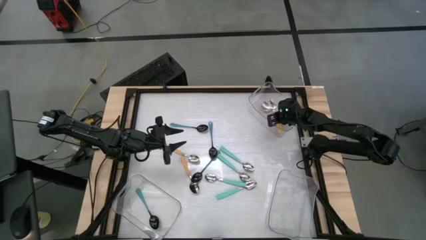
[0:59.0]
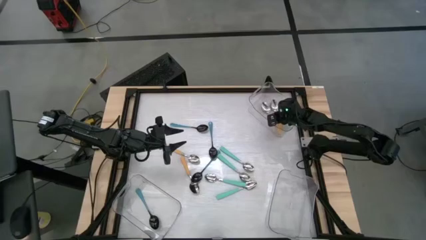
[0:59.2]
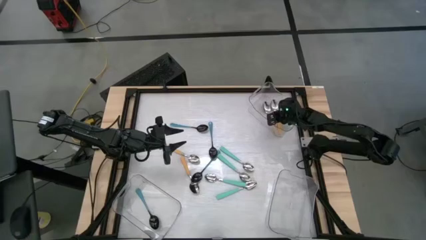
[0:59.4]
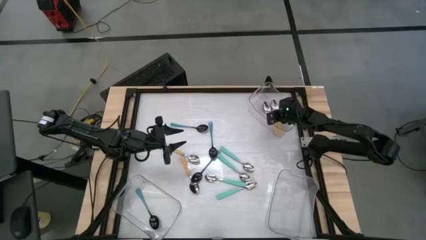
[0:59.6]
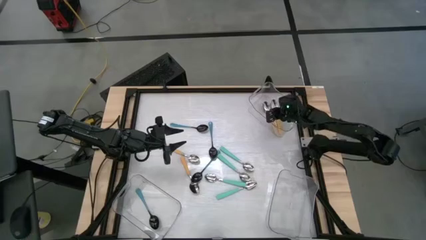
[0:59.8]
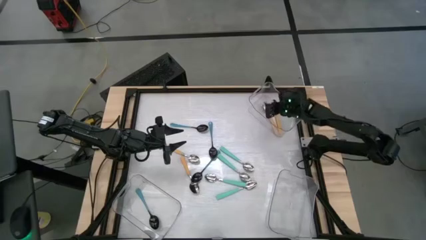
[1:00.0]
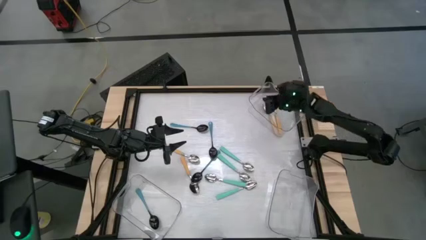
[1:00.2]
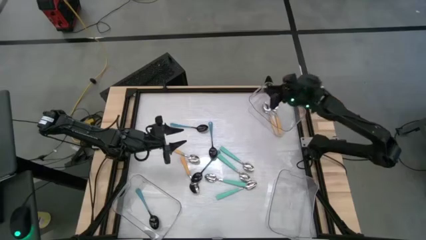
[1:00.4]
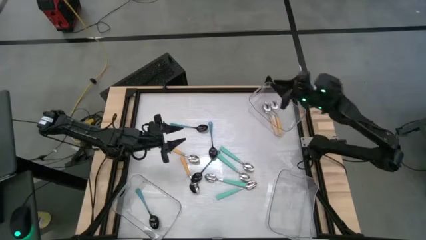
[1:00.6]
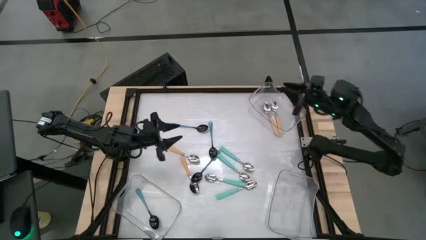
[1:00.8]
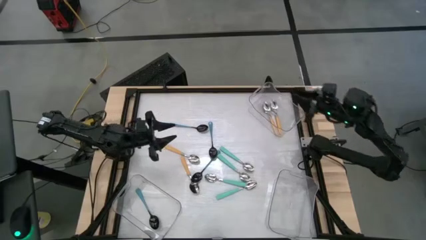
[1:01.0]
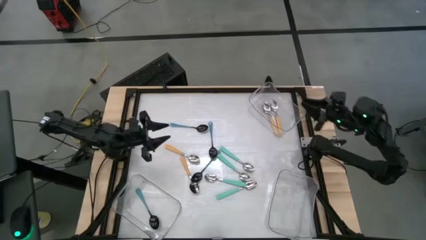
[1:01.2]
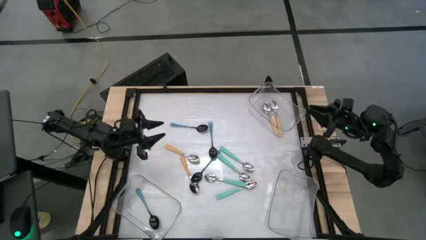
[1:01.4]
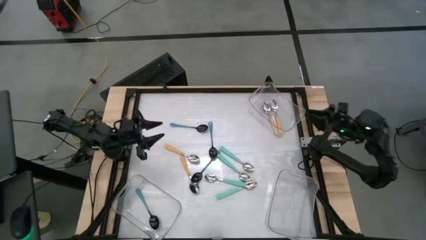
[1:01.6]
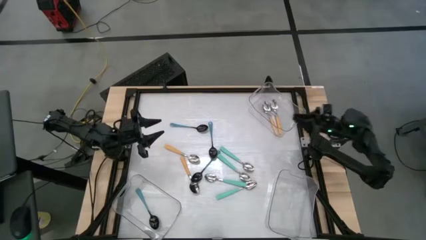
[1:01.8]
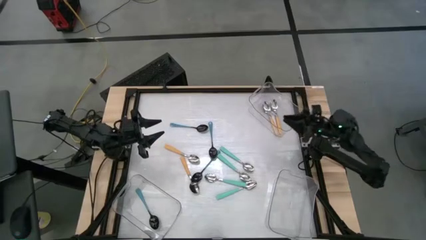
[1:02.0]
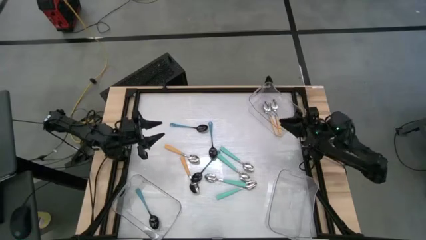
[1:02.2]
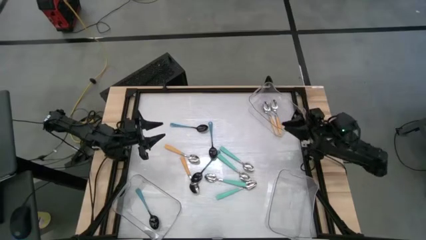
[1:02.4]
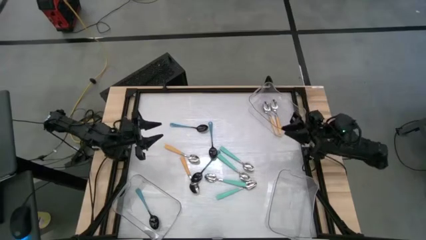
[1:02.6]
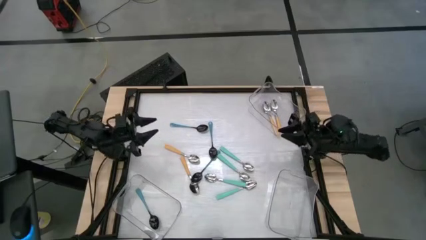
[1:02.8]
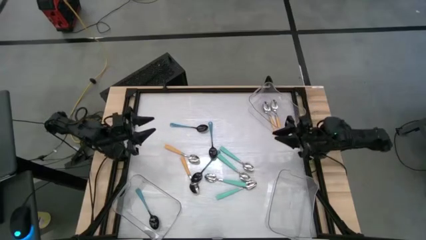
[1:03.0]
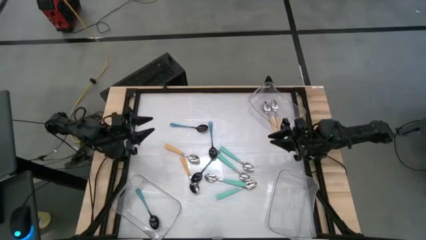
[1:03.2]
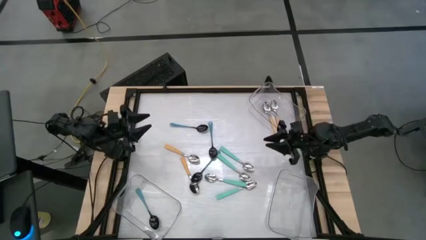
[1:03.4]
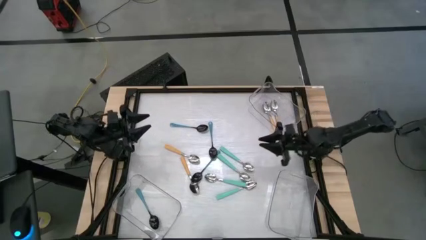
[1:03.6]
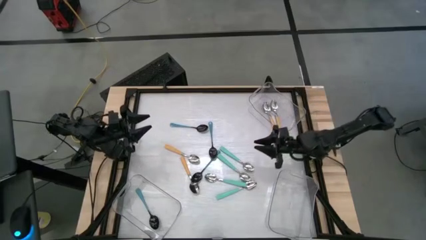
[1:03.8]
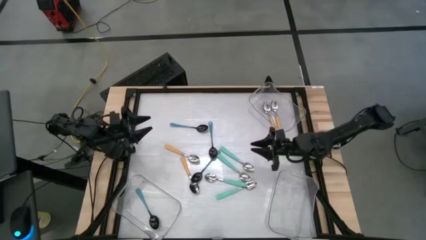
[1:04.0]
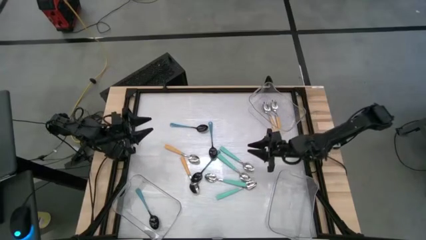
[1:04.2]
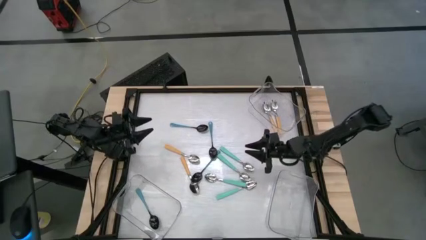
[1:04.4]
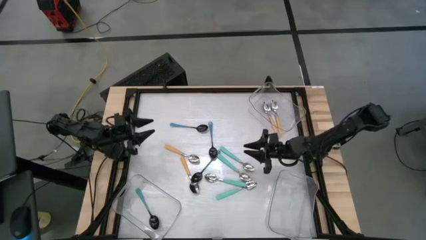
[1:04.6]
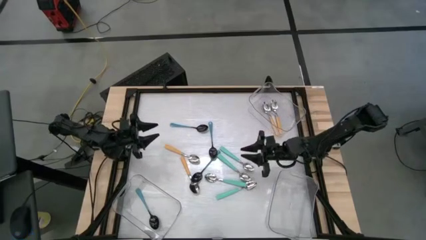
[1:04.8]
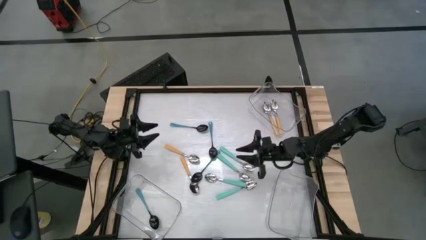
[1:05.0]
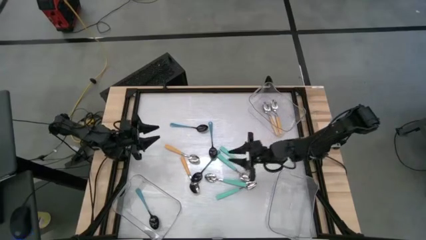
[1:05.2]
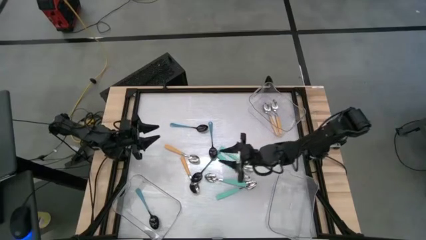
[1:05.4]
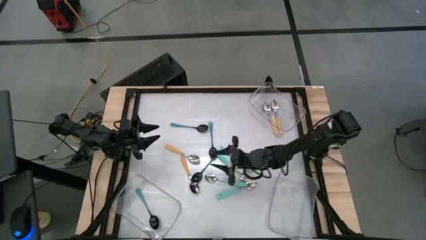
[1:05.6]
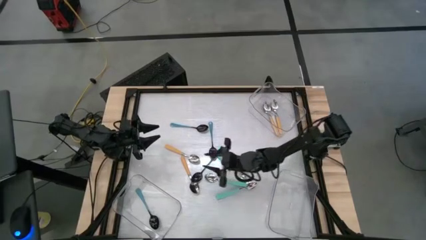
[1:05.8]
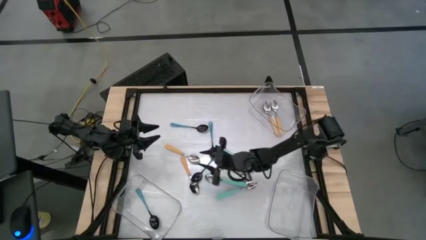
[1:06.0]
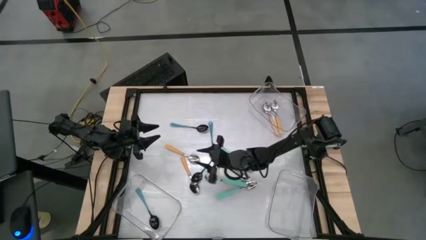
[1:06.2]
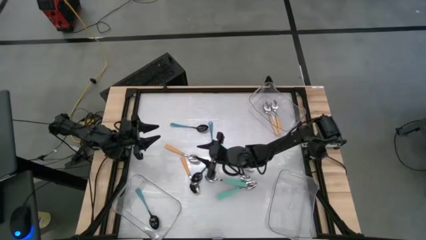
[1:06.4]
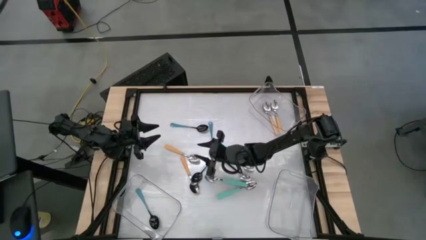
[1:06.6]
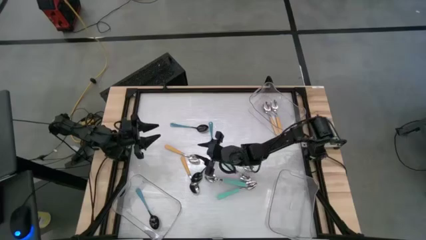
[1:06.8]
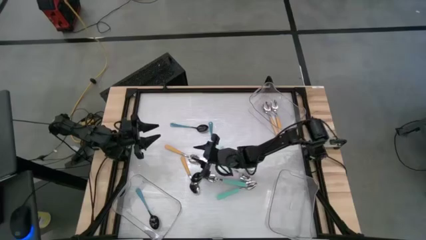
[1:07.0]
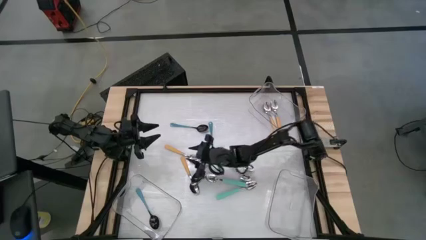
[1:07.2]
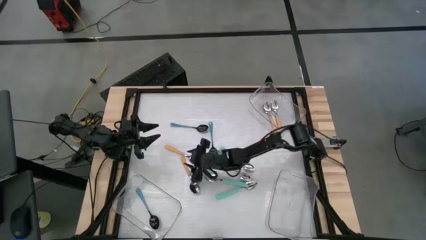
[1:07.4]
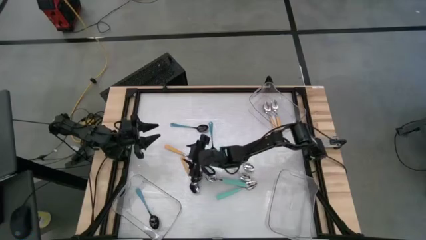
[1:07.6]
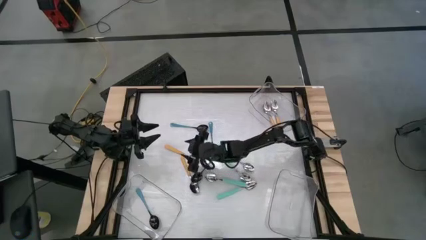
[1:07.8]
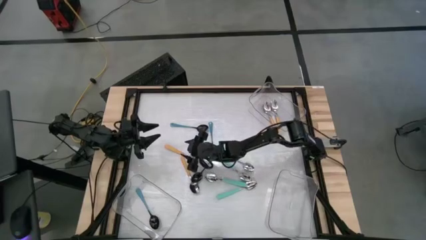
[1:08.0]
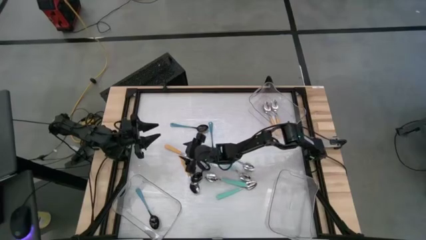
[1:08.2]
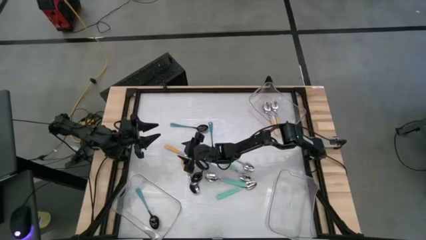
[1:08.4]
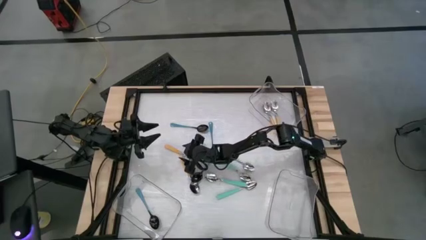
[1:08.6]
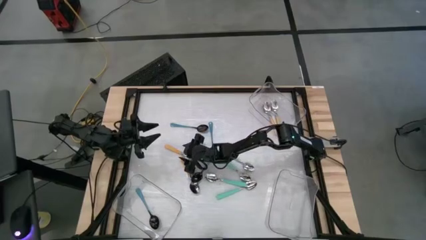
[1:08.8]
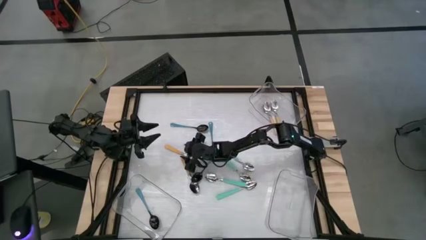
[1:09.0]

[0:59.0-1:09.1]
Task: Sort silverware by color (type)
Put the yellow spoon into the top transparent bin

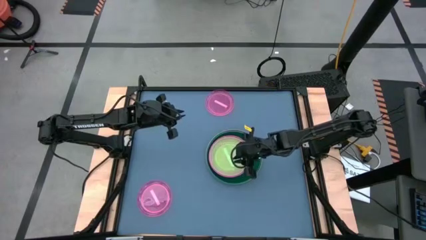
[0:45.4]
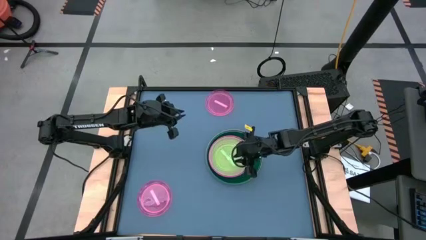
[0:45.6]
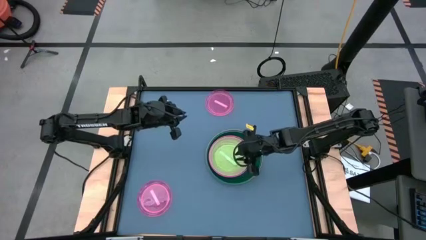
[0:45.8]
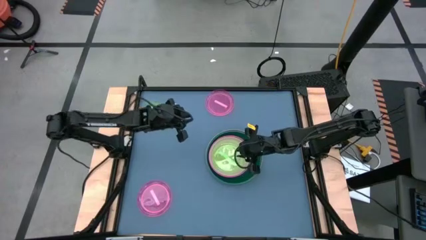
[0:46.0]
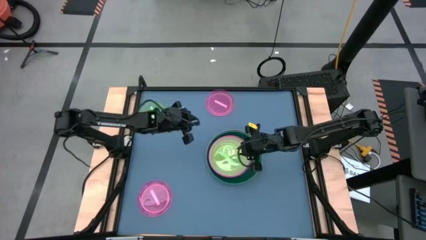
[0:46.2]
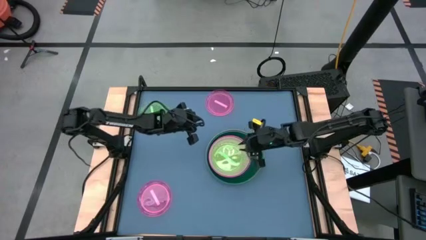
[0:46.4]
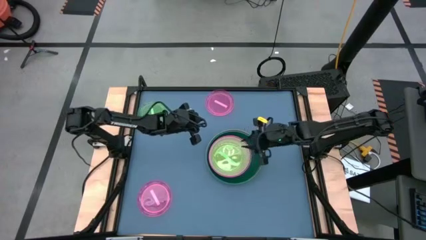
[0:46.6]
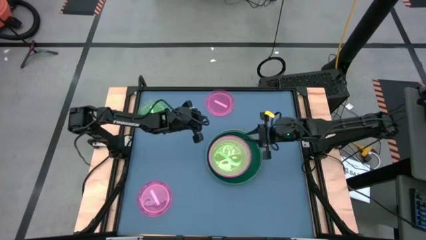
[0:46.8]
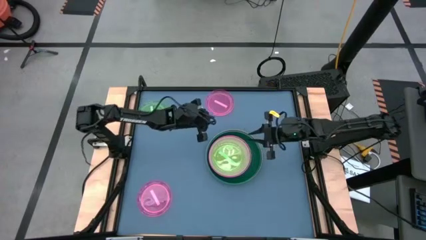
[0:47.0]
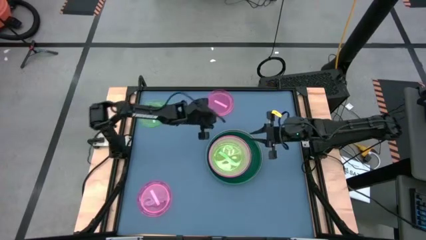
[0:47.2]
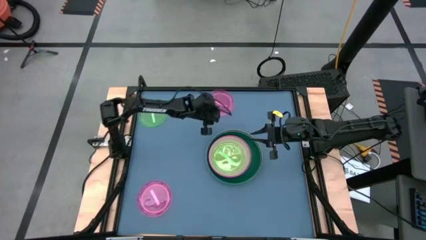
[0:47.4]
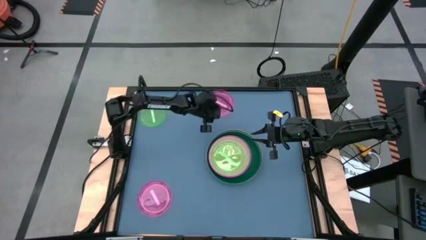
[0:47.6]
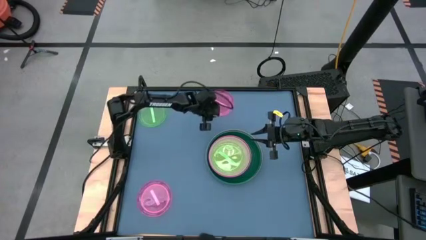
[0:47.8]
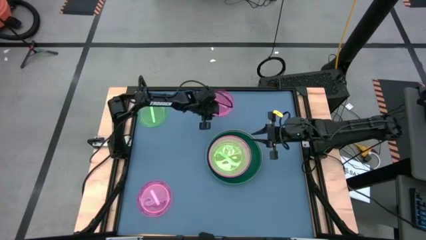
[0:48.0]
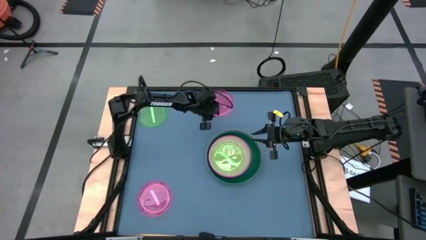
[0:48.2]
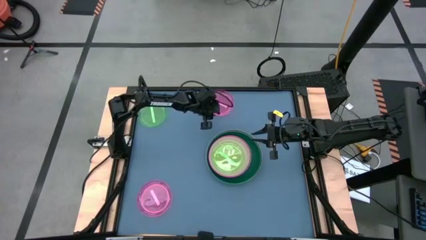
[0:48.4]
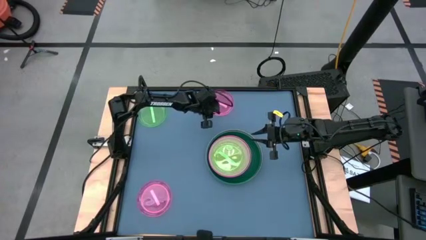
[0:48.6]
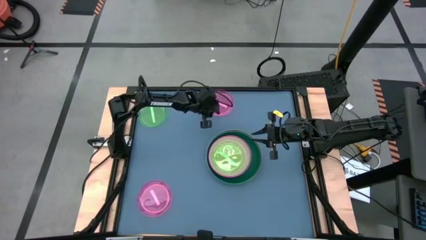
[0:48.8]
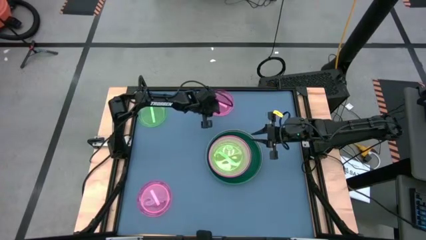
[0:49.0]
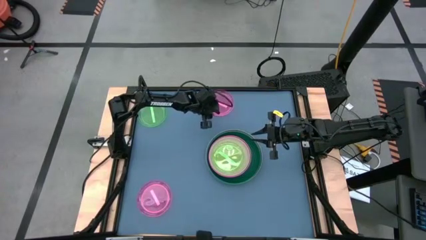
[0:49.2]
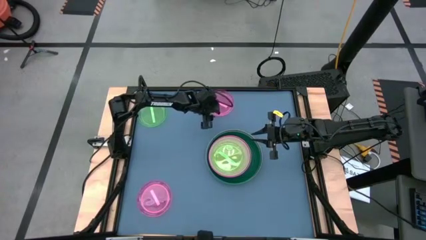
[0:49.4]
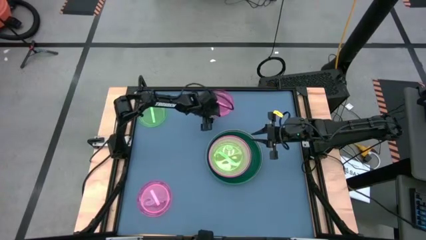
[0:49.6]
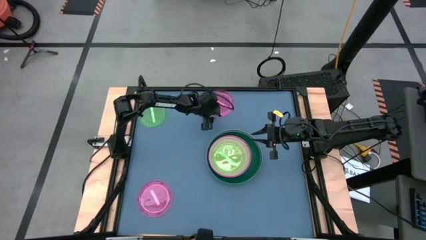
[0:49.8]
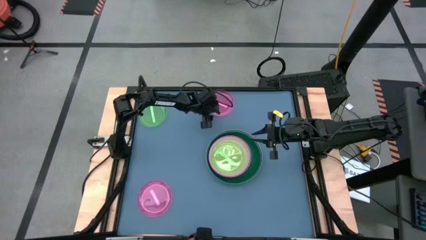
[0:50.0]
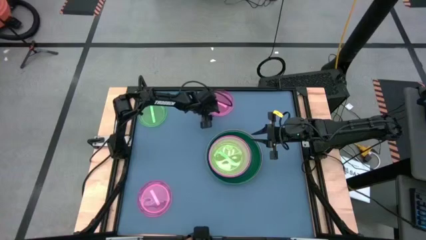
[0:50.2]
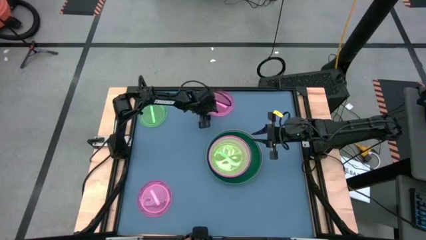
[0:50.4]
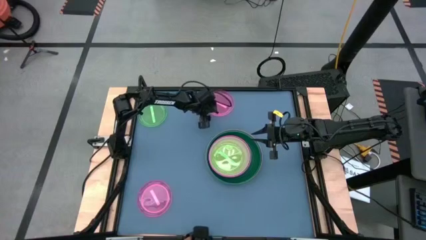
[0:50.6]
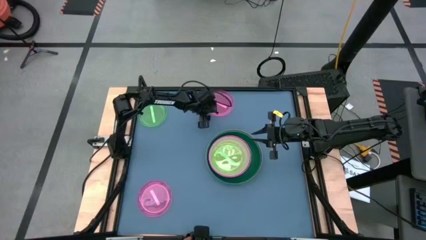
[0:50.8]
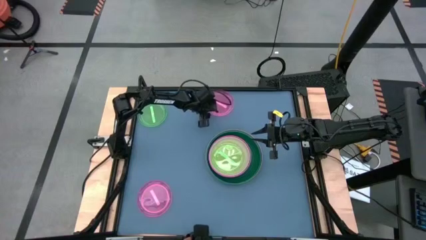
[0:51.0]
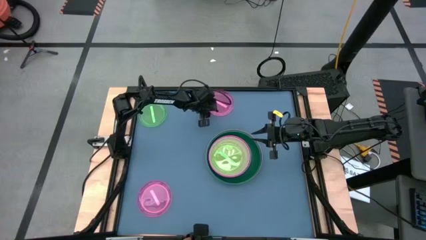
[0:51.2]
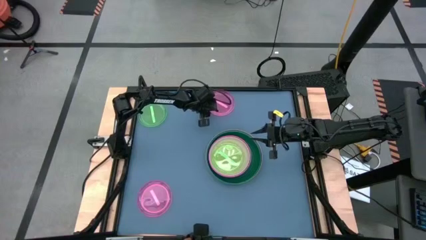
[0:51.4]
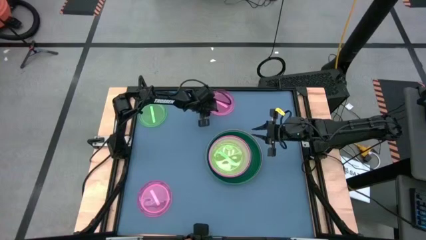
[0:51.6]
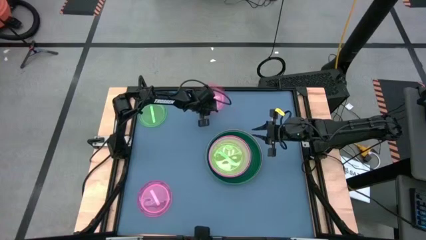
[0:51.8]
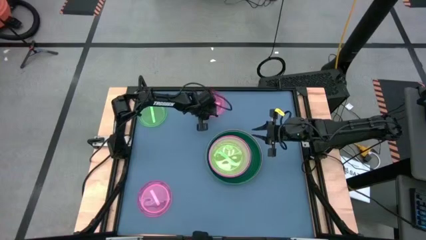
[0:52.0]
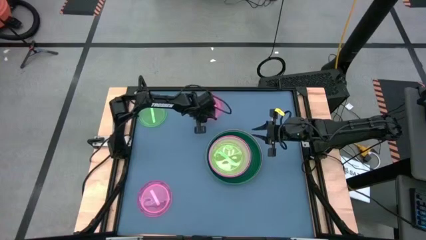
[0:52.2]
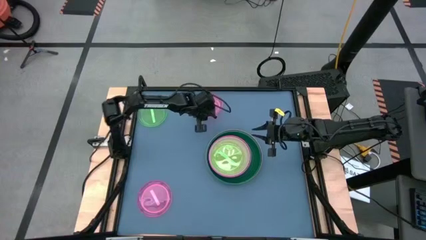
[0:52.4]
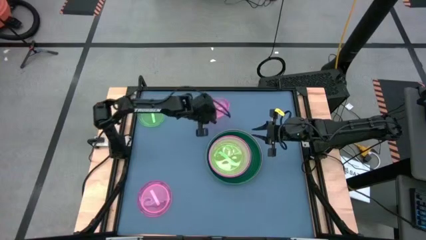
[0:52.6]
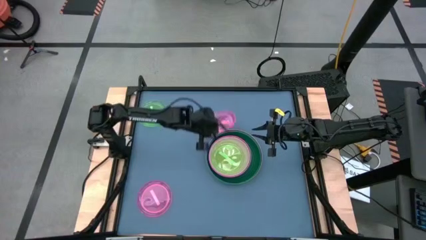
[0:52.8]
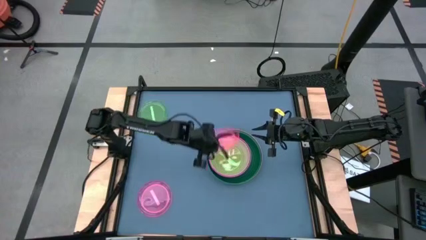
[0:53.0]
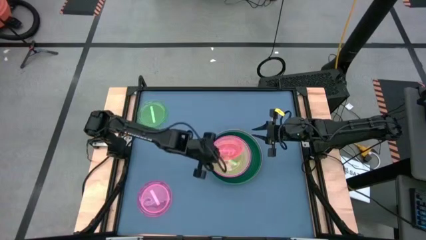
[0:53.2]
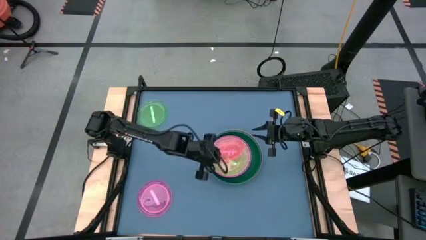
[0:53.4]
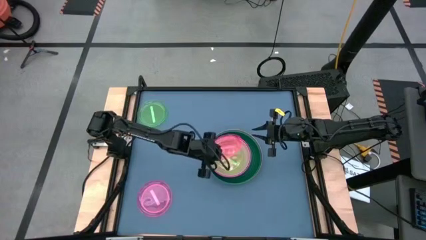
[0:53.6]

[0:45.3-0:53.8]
Task: Stack plastic plates
Stack the top light pink plate on top of the light green plate
